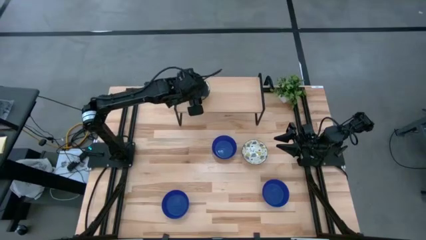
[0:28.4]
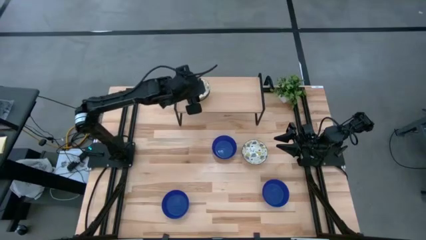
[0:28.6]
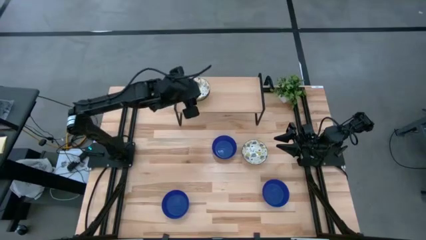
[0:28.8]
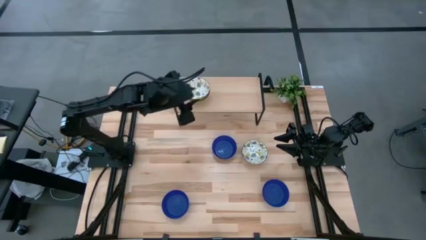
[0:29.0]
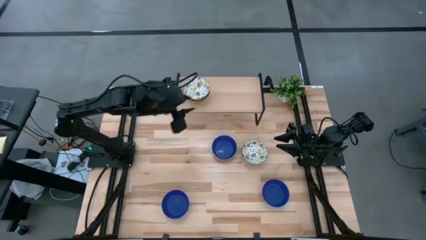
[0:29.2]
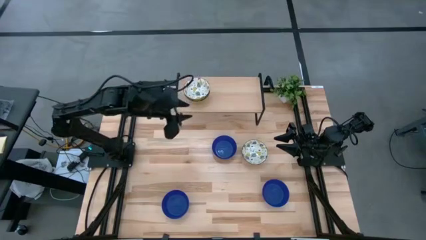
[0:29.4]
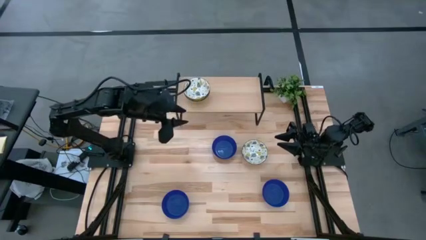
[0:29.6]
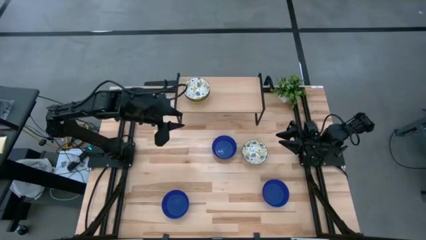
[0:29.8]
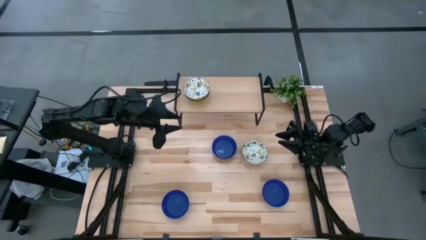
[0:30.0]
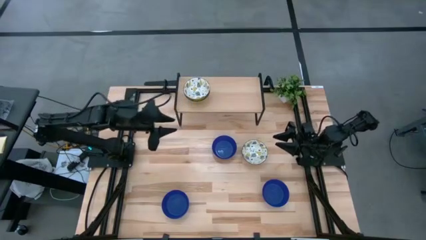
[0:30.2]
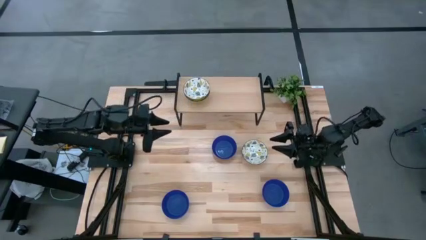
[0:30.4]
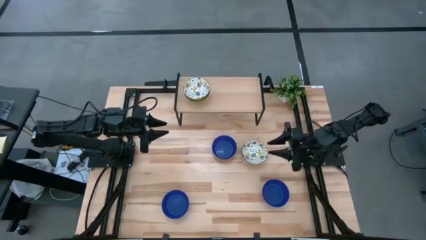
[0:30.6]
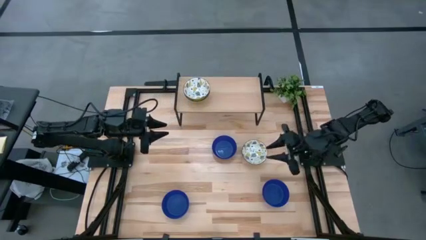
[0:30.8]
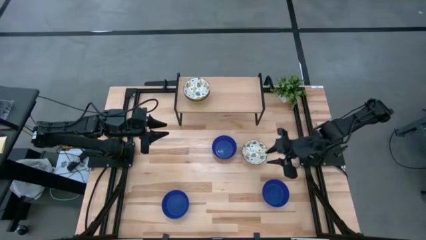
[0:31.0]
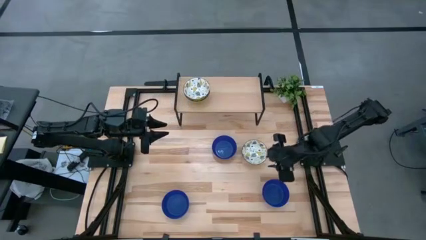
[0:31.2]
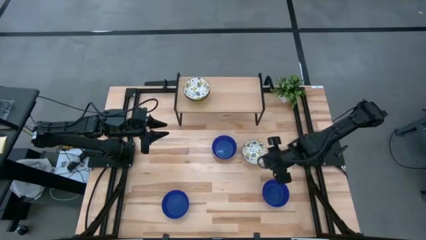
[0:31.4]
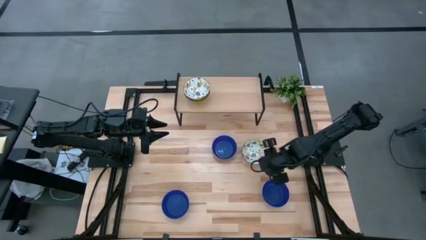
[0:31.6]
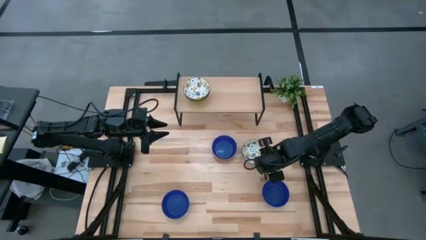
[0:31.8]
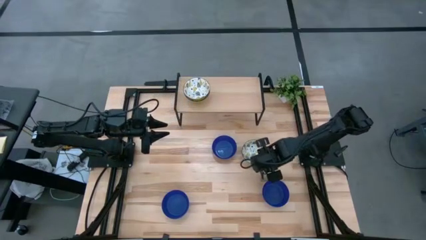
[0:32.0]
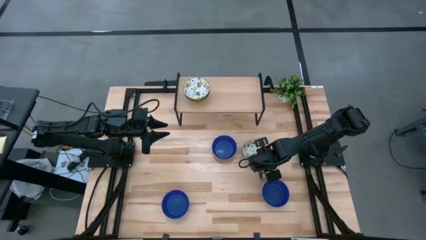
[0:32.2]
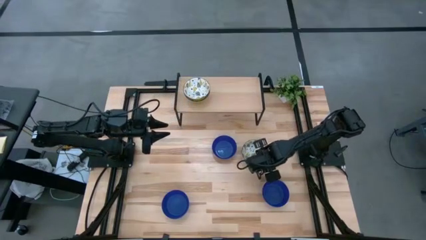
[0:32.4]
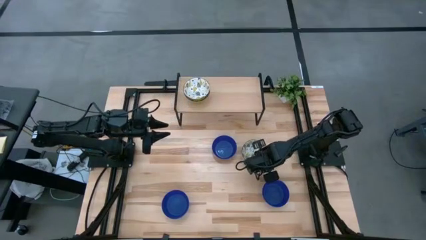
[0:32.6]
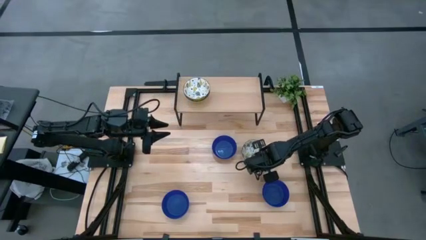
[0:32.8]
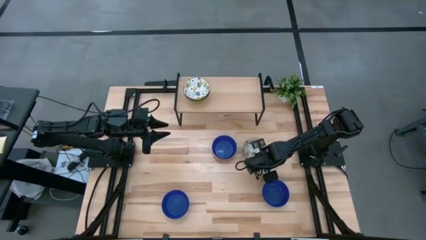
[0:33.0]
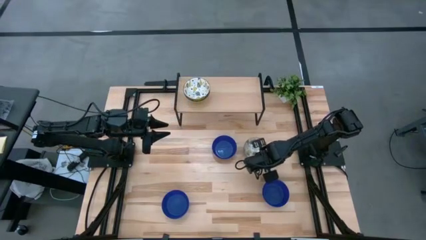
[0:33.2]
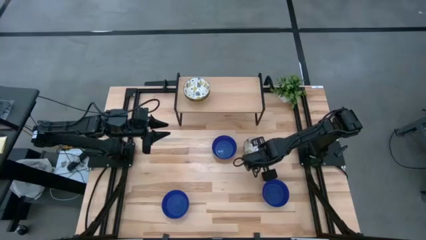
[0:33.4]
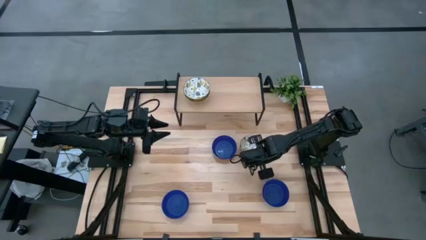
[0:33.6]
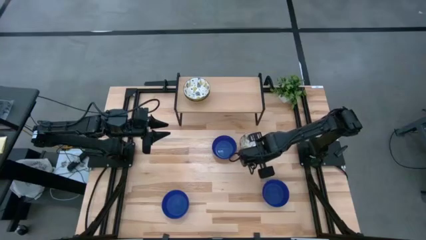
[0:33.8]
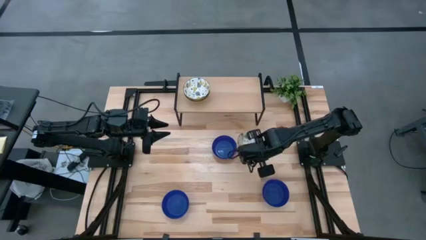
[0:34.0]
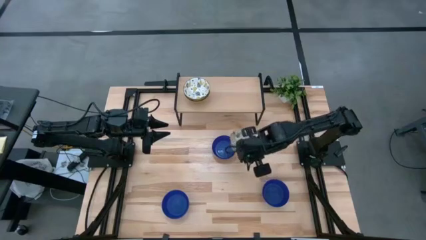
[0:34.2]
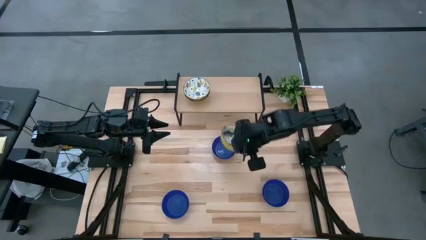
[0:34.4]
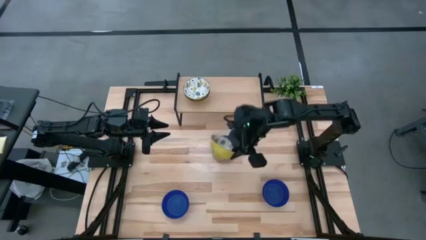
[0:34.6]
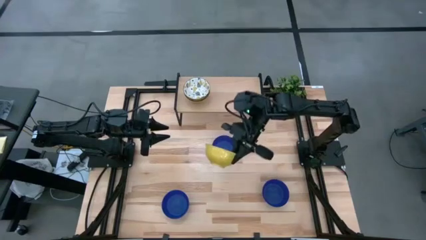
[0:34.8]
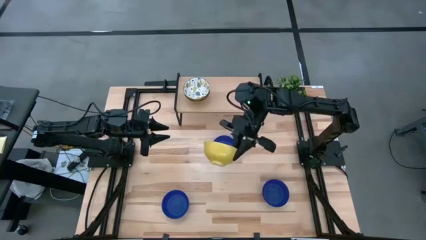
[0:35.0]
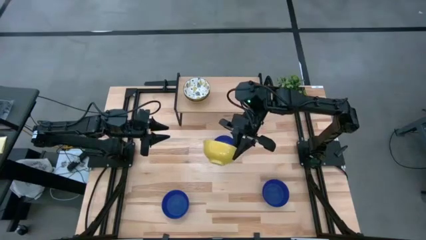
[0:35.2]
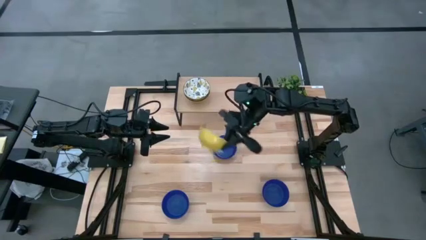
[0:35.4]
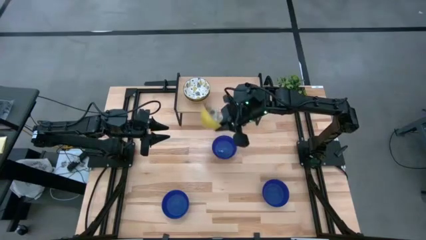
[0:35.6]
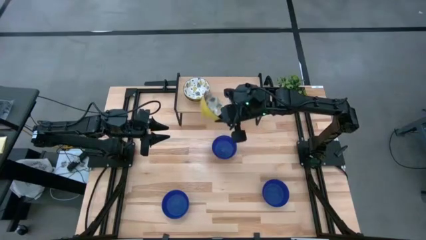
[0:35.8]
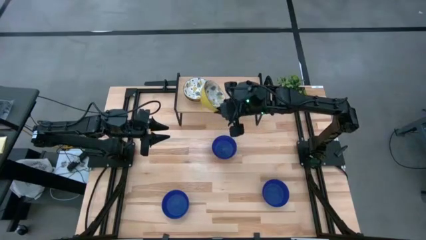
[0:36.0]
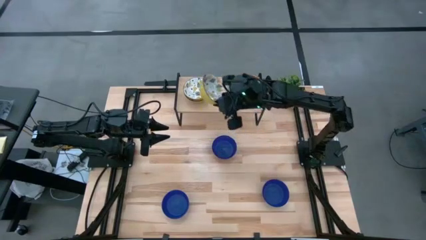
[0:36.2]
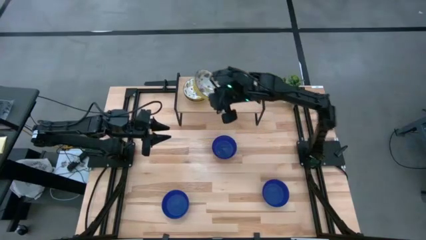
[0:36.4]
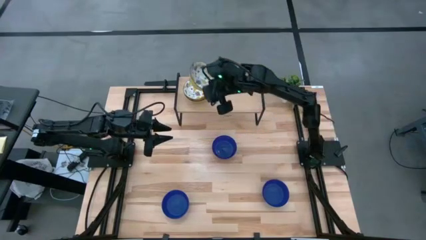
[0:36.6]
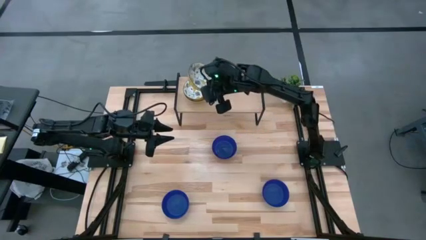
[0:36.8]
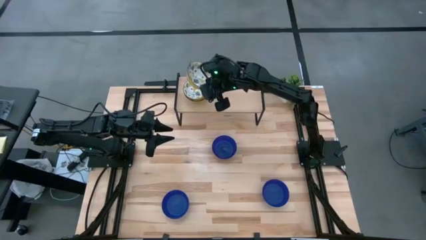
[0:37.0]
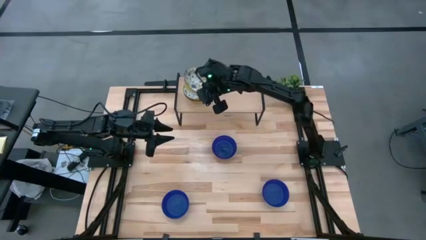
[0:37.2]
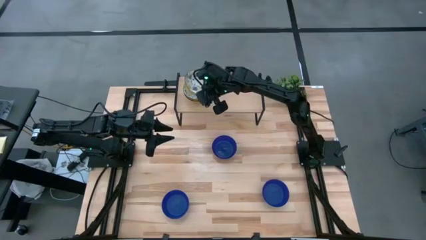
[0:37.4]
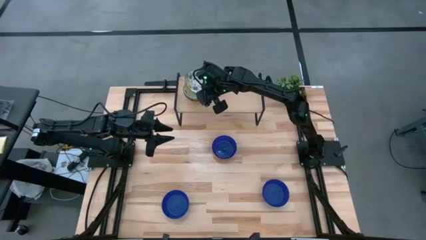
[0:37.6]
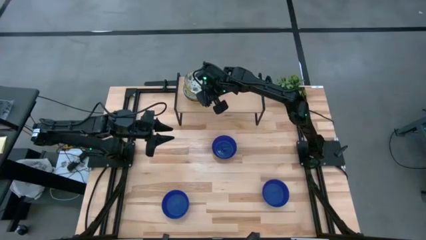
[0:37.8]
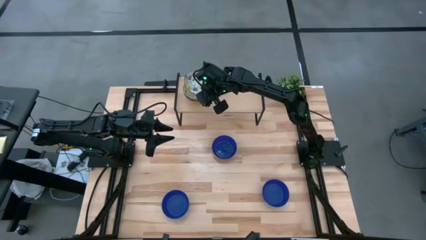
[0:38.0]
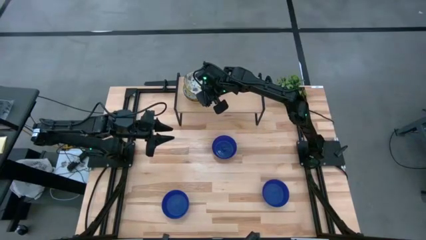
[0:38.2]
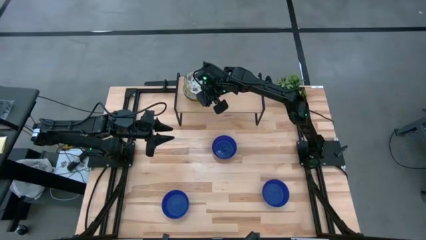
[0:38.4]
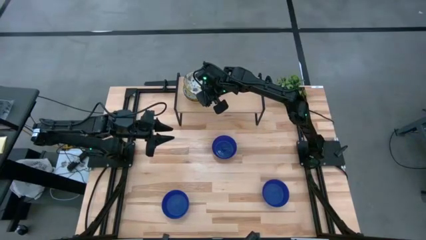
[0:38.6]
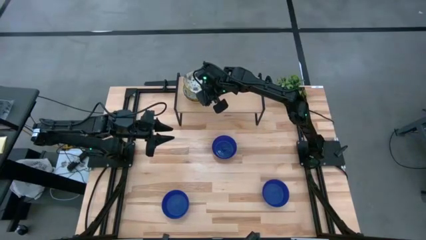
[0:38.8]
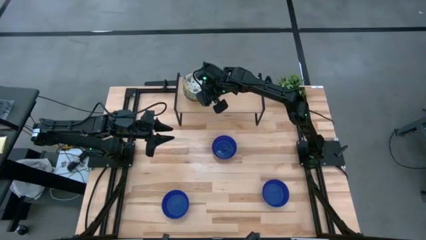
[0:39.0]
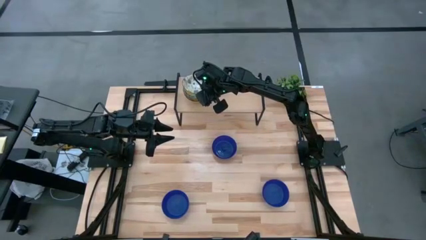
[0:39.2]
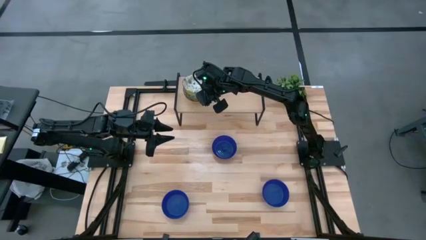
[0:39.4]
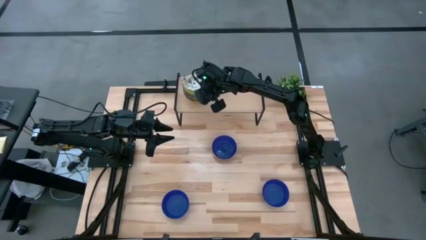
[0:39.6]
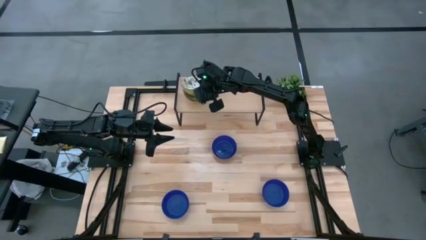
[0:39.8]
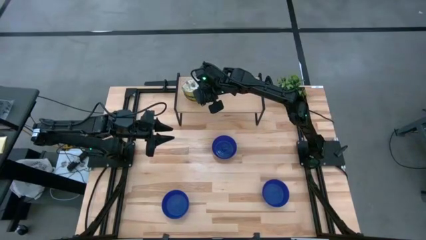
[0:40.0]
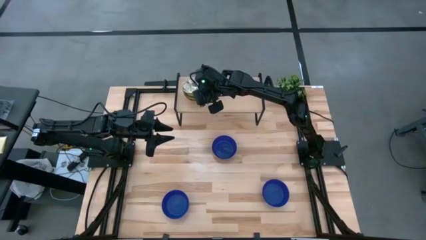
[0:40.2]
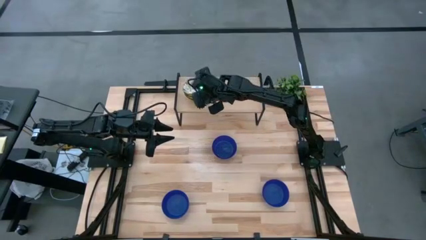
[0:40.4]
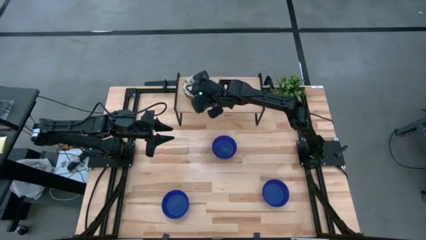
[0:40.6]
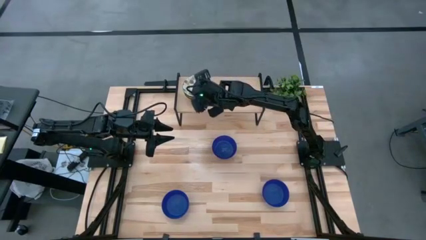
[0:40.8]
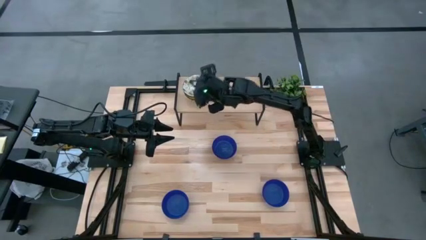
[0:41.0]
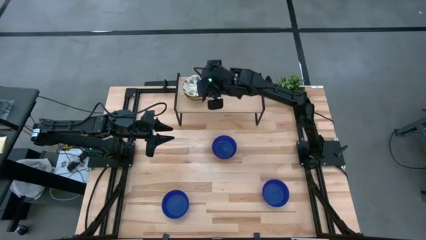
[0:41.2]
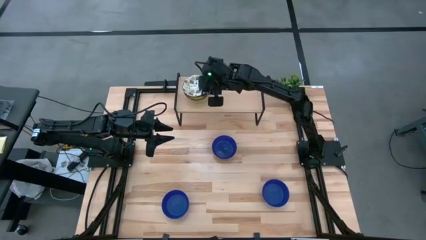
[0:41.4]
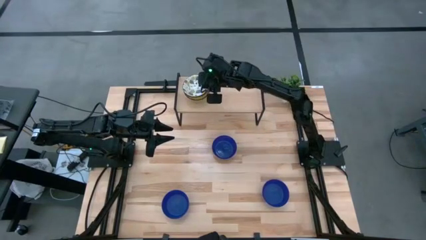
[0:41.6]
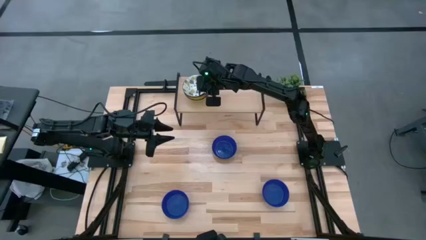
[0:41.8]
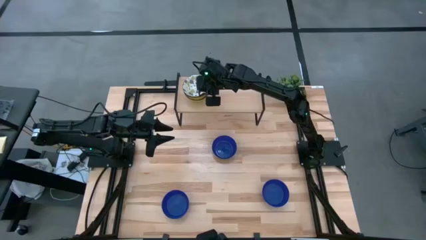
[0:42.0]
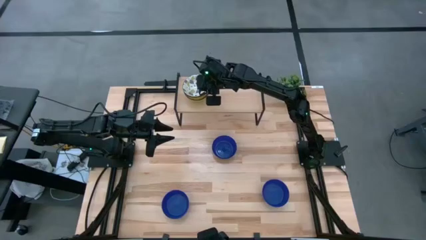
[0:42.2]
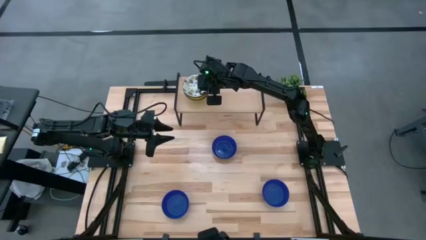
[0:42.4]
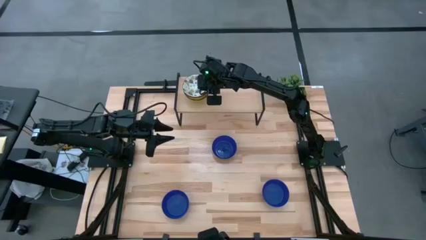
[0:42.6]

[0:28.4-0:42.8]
Task: Pick & Place Mini bowls
Stack the white bowl on top of the white bowls on the shelf
